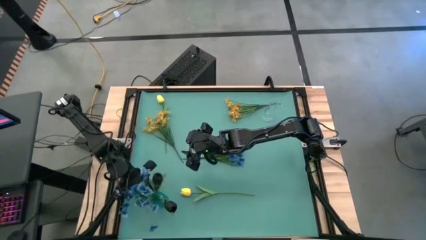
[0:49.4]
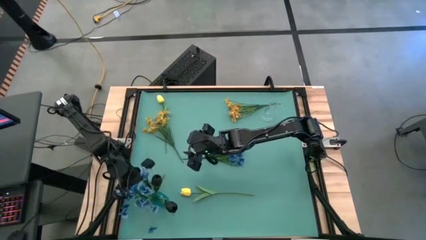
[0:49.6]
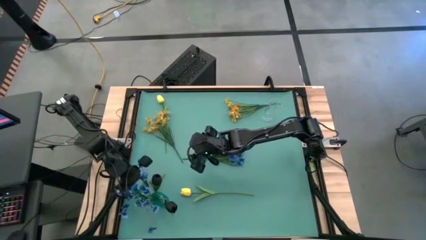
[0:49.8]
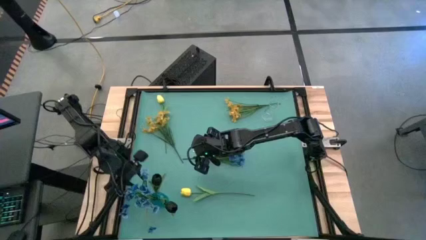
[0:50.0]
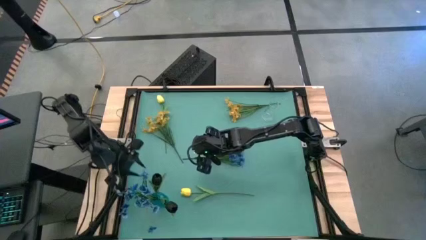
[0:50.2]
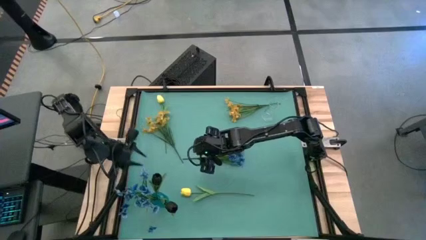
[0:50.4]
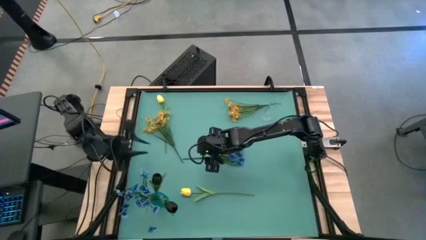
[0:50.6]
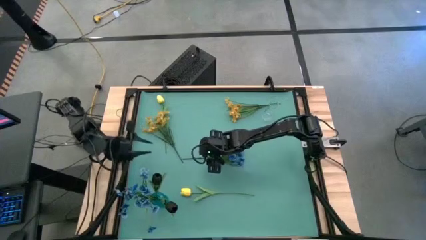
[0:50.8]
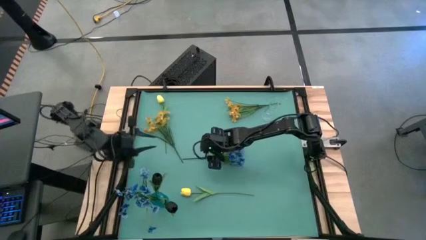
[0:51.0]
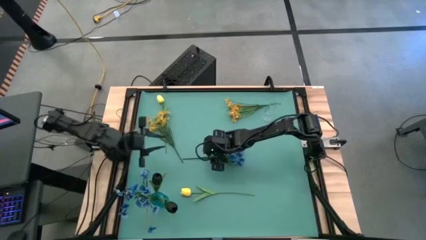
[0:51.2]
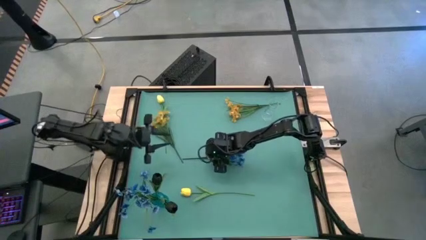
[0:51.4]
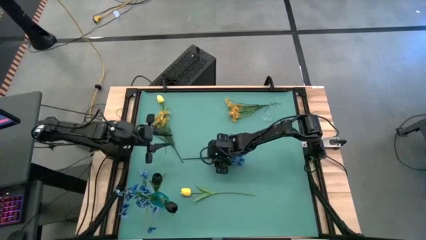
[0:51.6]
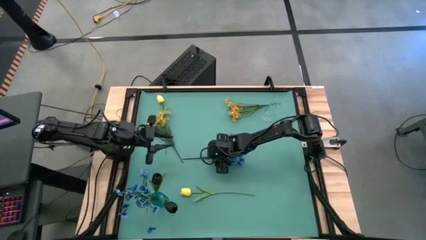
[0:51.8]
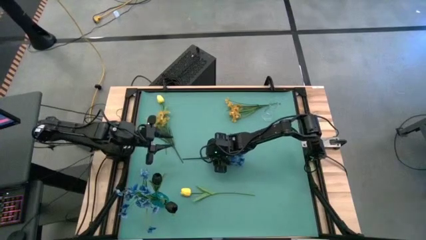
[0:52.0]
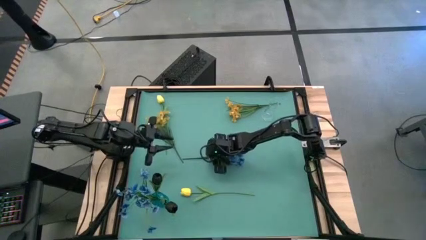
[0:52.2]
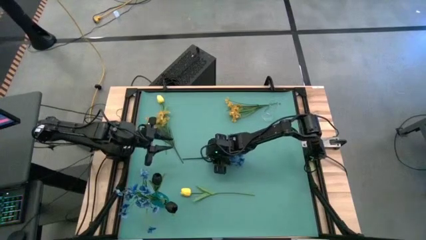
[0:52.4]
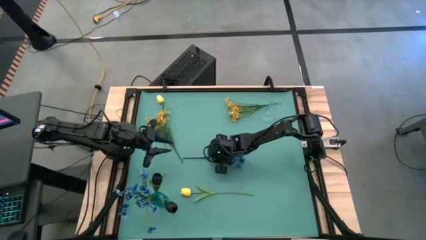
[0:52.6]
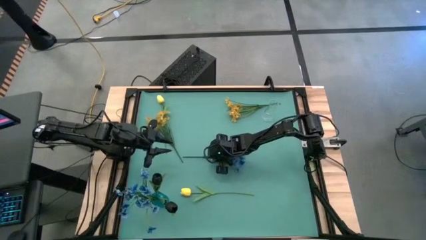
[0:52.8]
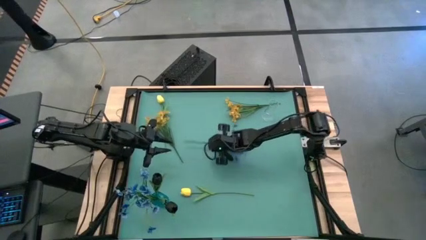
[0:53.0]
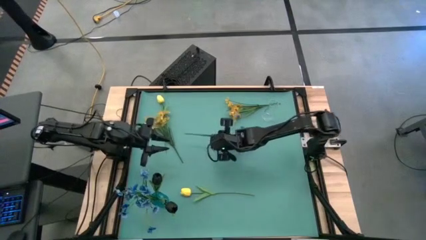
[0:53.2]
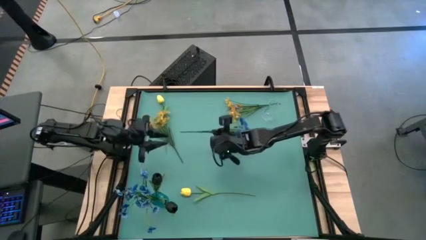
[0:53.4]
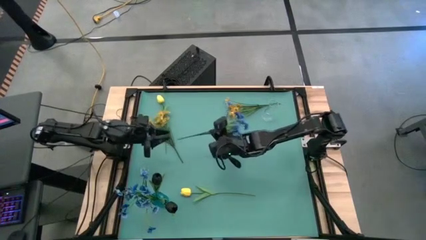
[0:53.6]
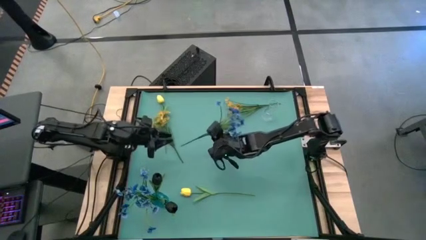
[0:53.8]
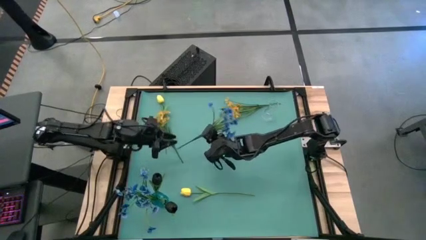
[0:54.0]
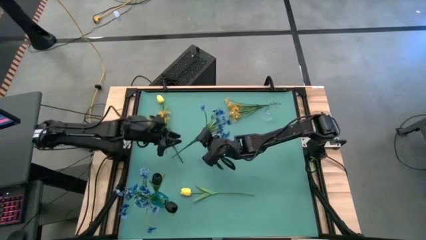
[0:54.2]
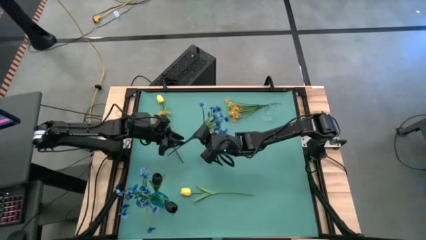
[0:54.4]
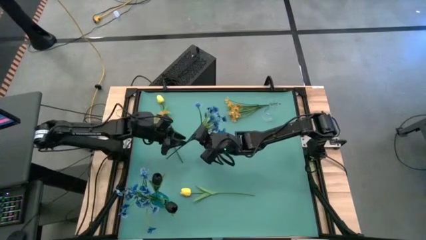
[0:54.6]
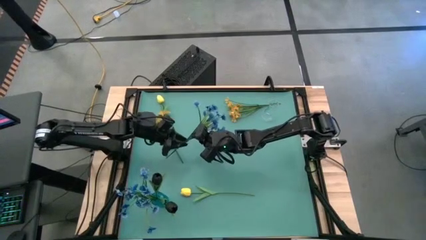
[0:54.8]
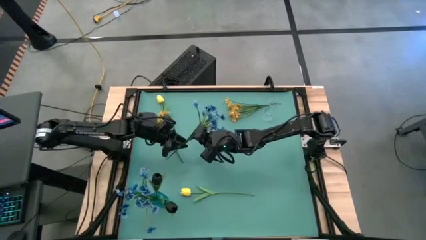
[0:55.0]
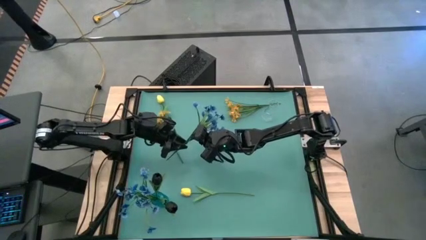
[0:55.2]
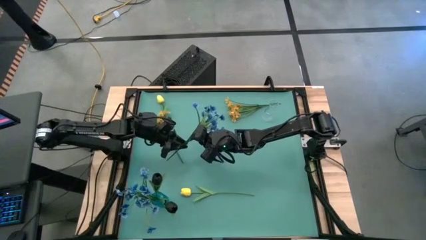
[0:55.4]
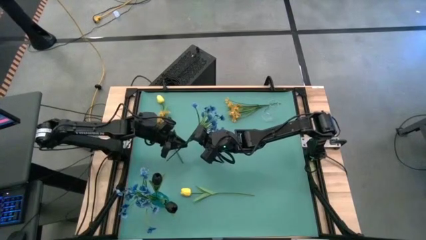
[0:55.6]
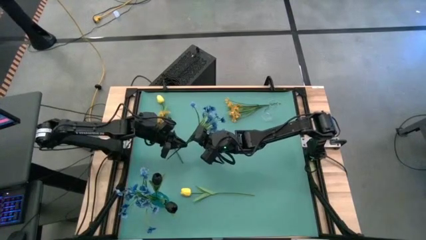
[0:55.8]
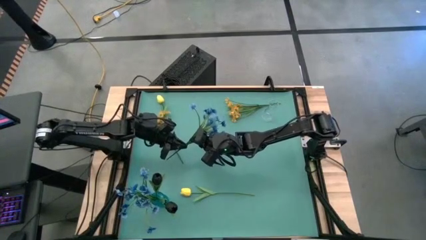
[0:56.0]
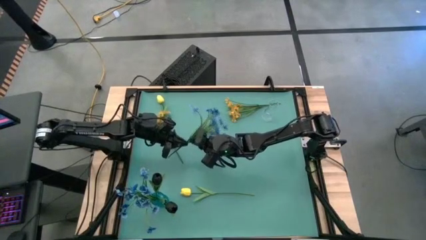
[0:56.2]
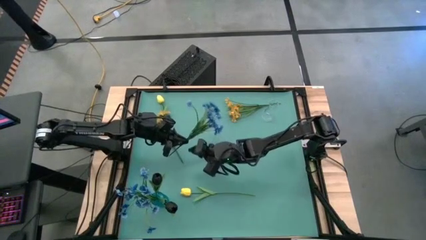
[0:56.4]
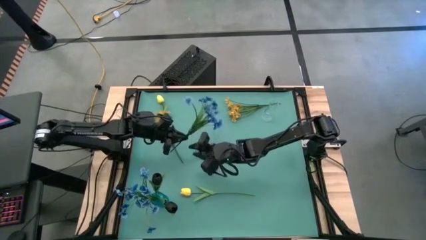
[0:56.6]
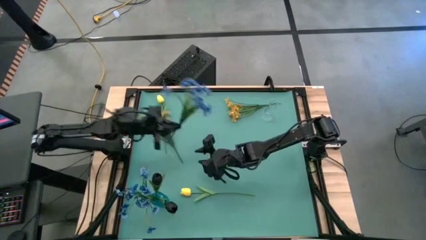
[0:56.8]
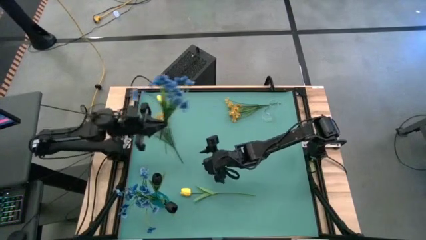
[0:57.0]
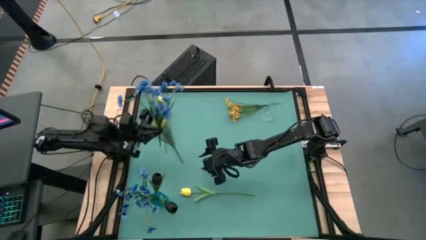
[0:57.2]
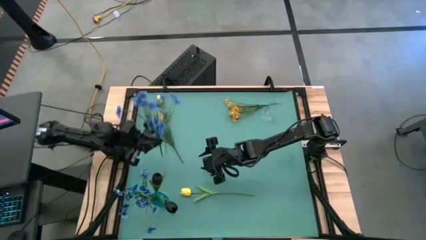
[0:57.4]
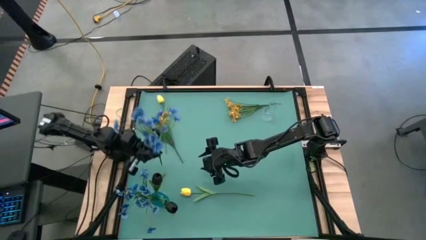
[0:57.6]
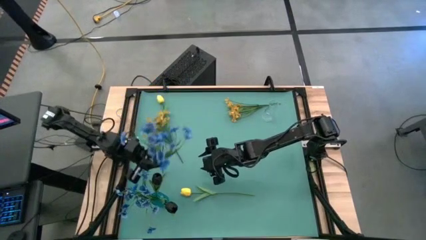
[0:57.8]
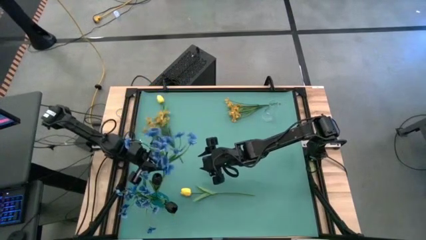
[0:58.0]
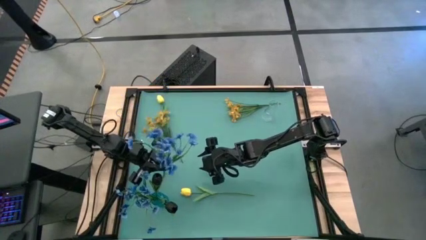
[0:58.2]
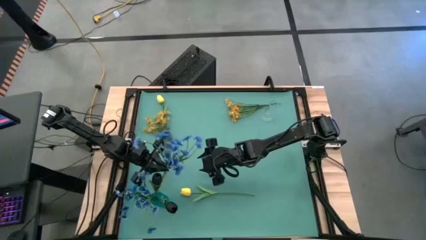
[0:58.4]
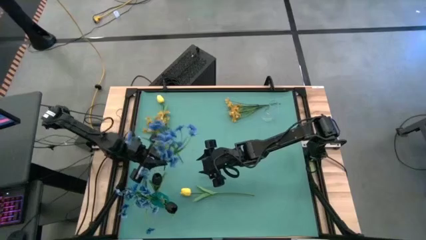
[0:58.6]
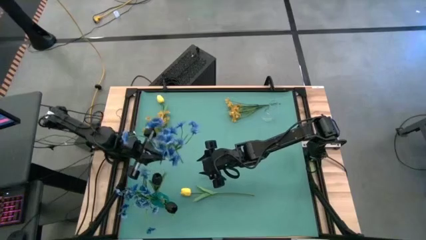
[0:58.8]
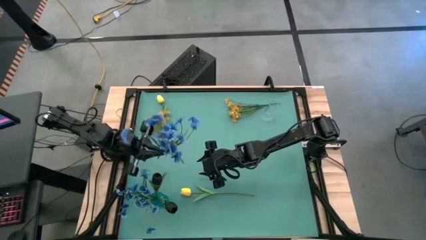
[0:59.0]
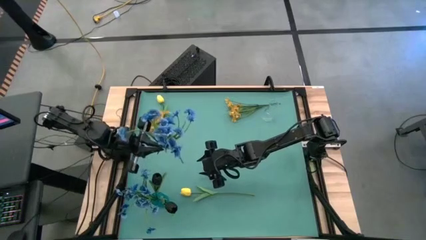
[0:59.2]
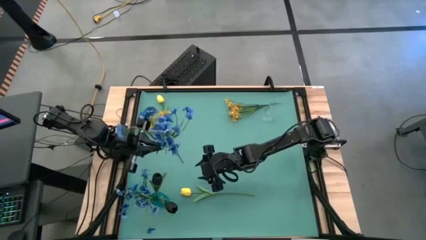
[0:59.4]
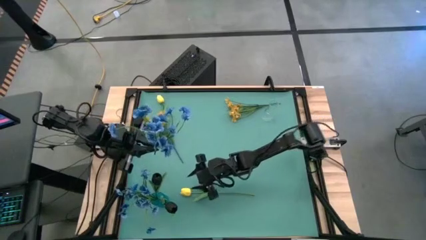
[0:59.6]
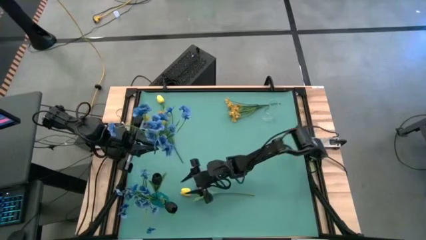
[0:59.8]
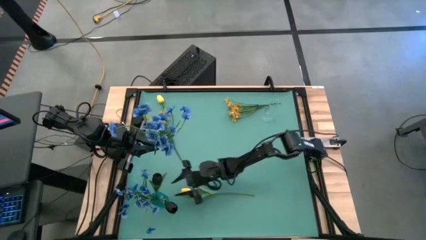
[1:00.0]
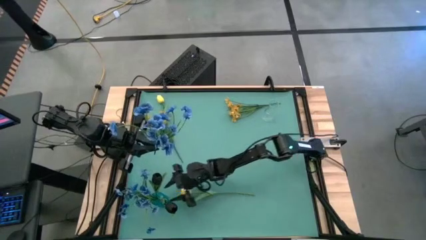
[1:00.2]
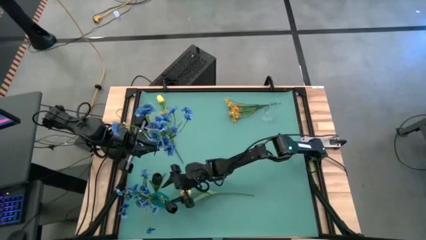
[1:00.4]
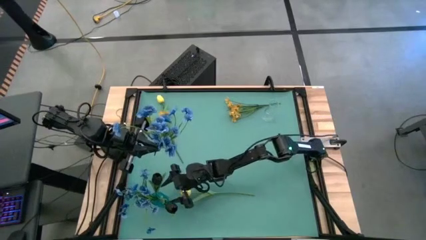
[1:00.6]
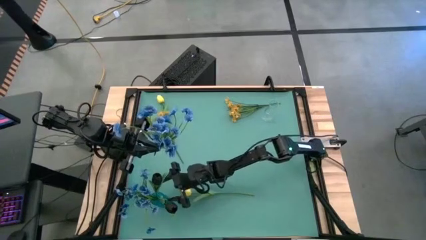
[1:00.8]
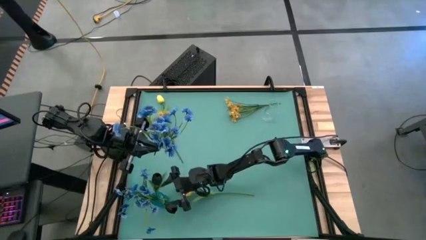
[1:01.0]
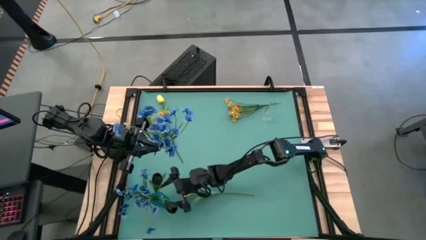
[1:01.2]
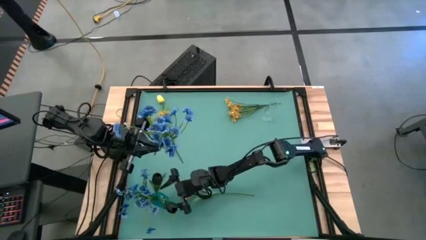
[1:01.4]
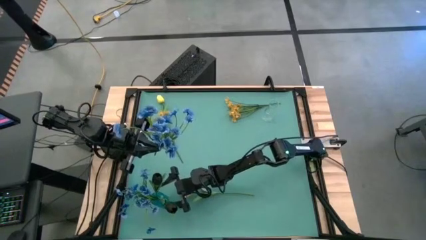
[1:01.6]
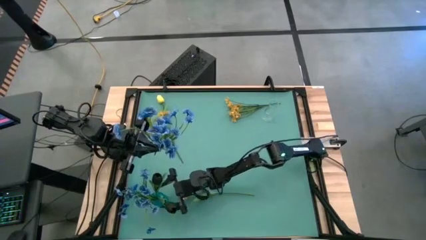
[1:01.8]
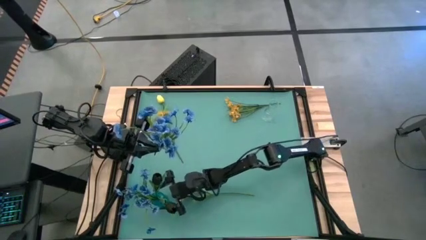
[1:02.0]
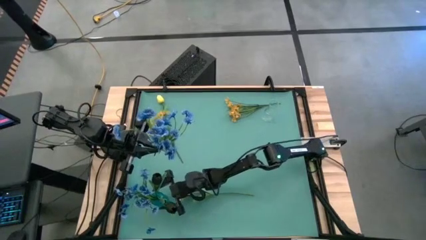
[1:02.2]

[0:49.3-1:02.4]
Task: Sort flowers into vase by color
Put the blue flowers into the blue flower vase
